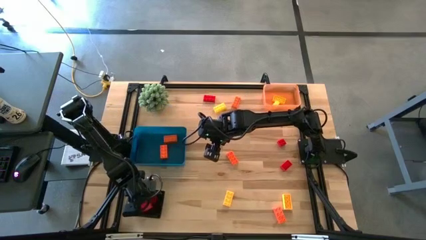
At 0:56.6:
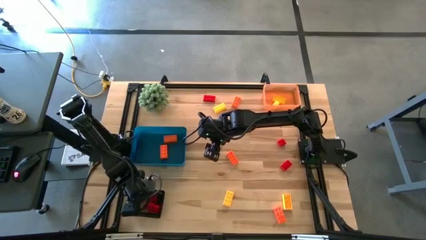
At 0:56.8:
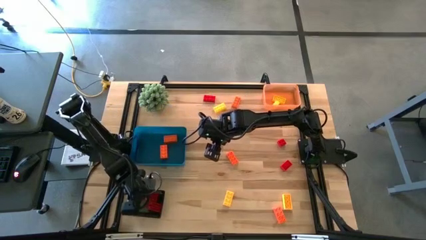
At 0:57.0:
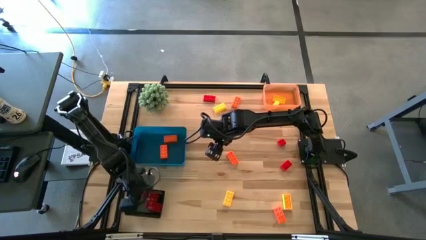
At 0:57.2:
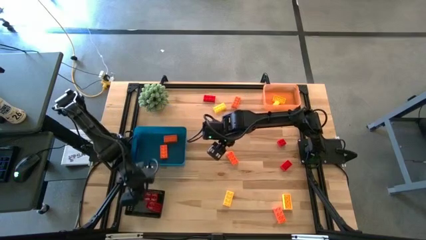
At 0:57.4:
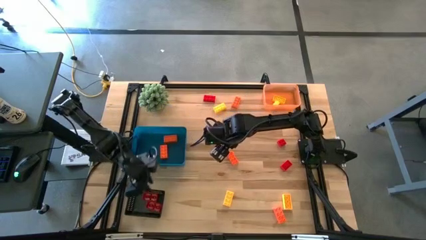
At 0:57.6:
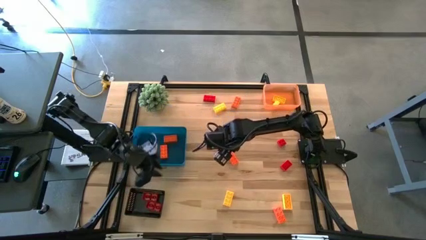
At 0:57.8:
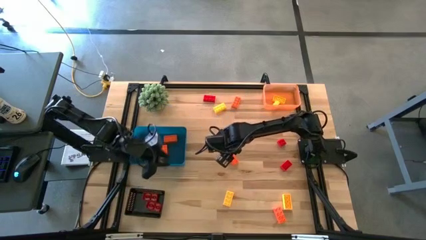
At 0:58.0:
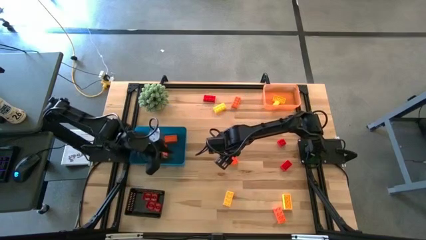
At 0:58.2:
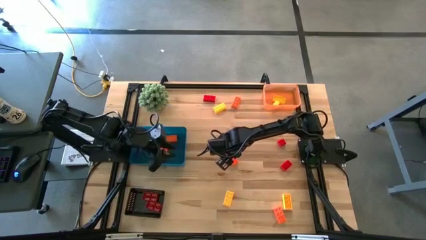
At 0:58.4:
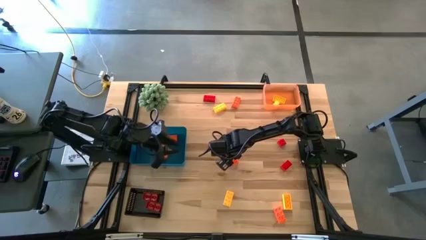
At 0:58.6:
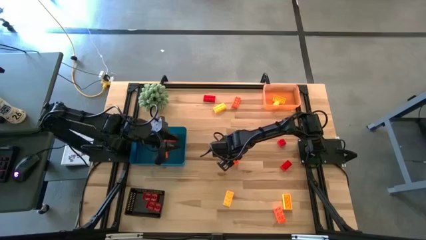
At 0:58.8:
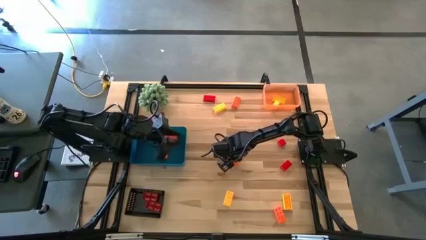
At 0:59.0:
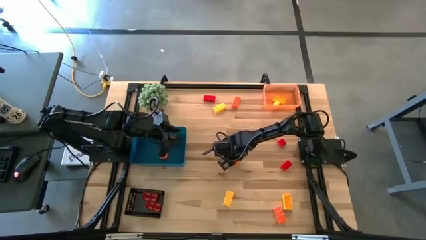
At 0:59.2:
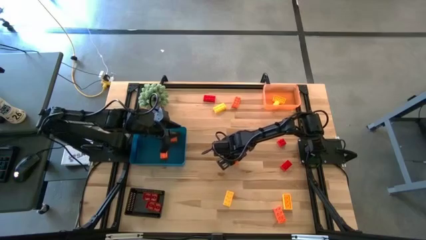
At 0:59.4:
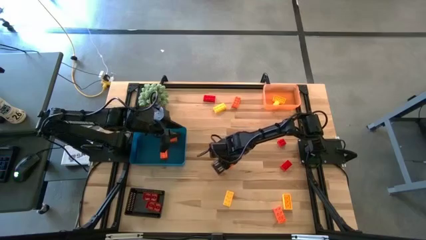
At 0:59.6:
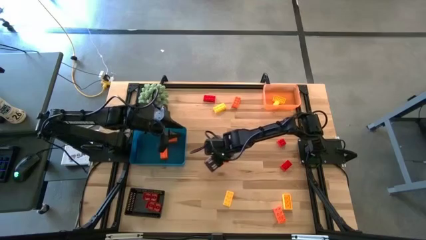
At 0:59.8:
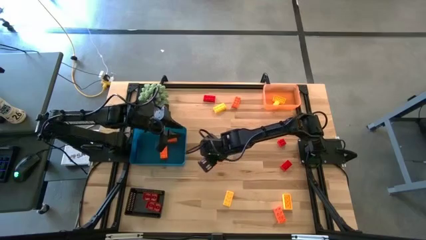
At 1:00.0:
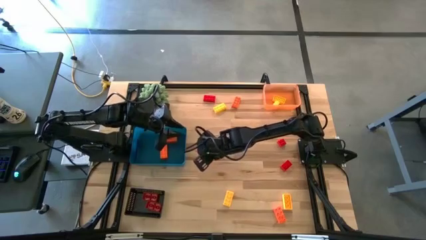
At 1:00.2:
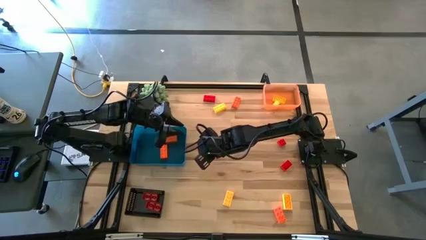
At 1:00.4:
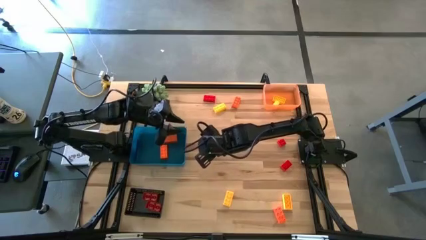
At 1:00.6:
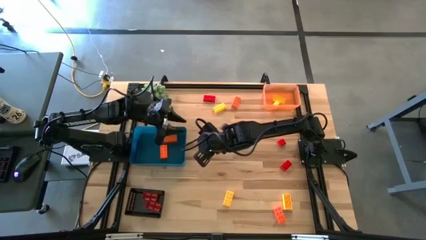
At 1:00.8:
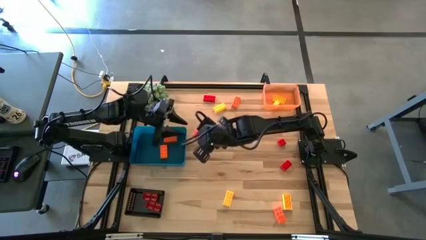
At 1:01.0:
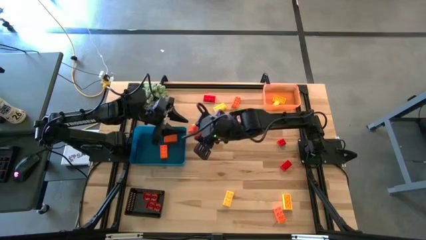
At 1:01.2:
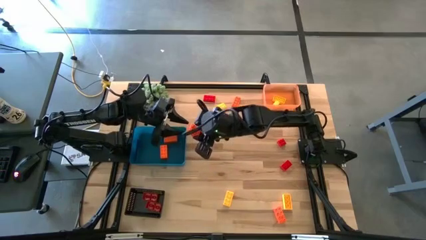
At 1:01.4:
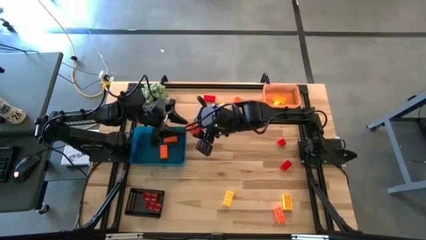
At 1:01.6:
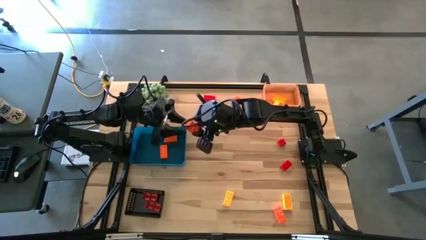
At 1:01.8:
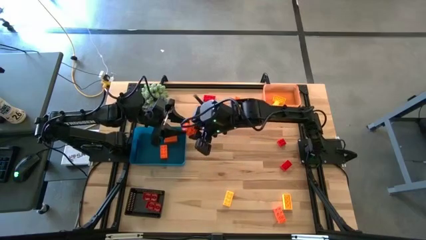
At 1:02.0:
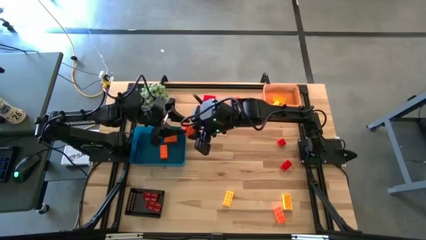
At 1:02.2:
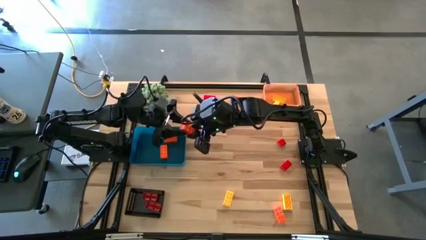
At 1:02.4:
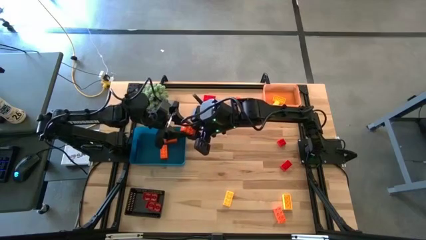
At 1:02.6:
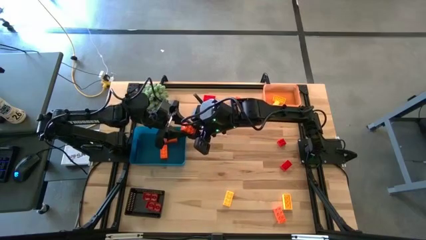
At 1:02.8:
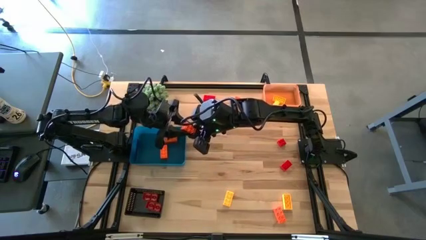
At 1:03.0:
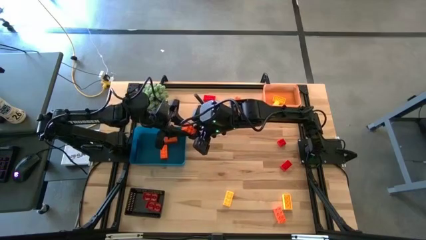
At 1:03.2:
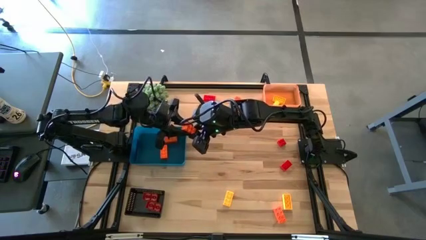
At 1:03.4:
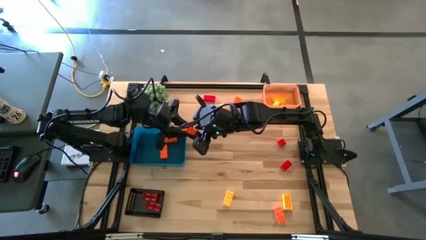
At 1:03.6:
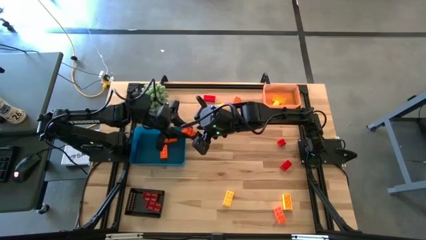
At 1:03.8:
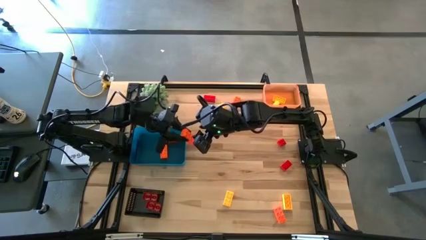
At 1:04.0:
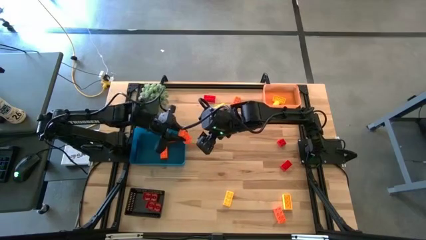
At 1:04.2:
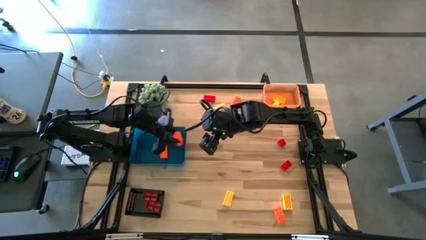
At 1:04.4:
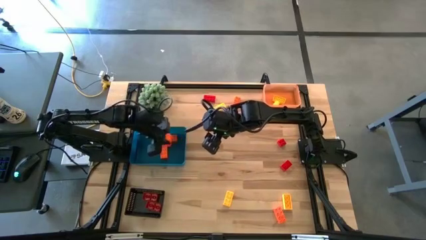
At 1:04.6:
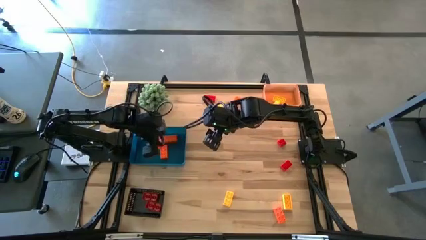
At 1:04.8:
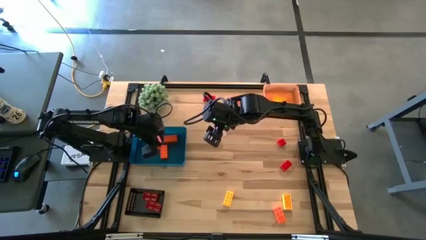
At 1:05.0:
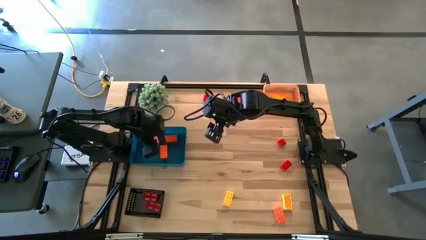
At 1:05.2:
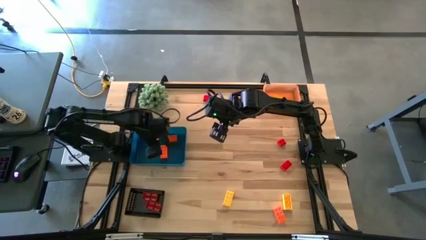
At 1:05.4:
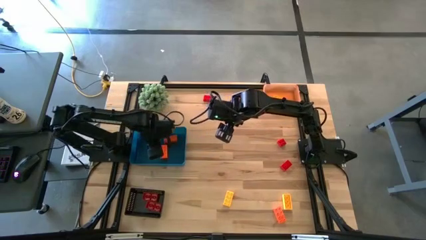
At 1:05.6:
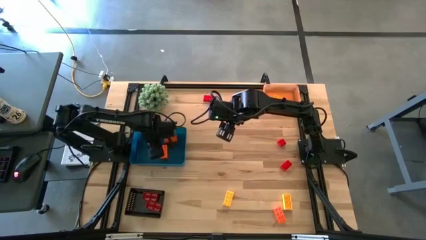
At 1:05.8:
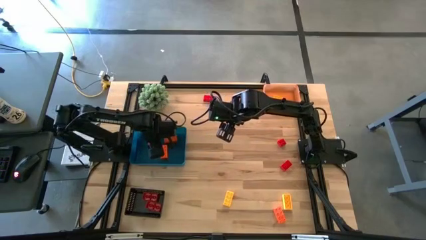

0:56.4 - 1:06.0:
Task: Sort & place blocks by color
Put the orange game piece into the blue bin

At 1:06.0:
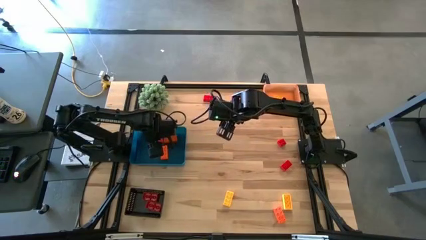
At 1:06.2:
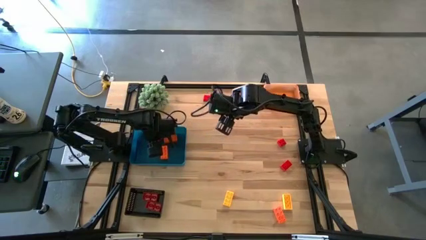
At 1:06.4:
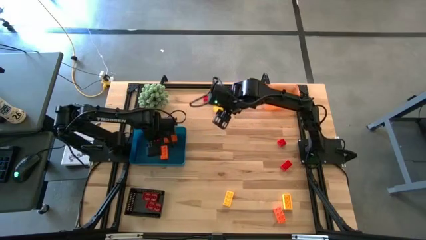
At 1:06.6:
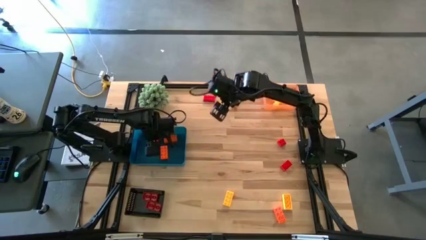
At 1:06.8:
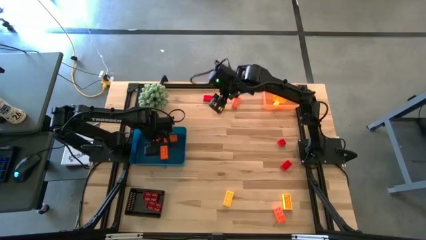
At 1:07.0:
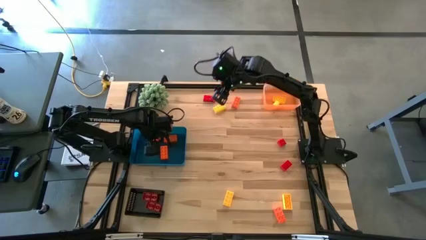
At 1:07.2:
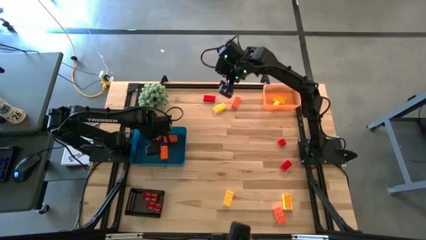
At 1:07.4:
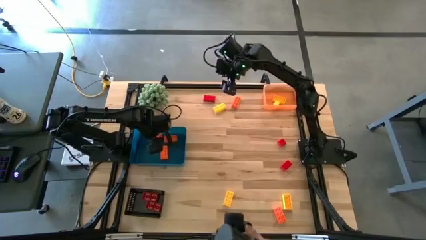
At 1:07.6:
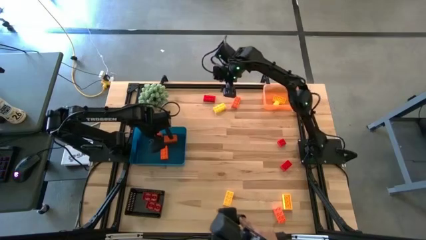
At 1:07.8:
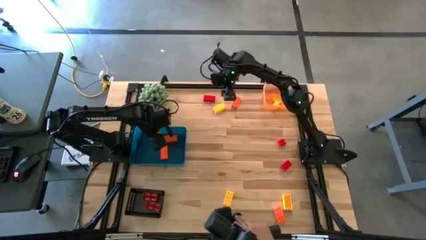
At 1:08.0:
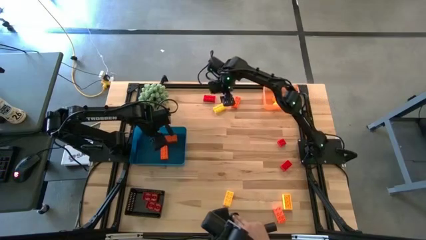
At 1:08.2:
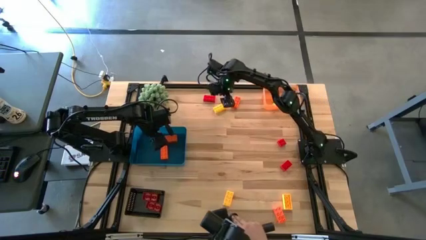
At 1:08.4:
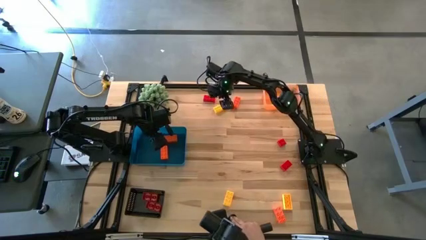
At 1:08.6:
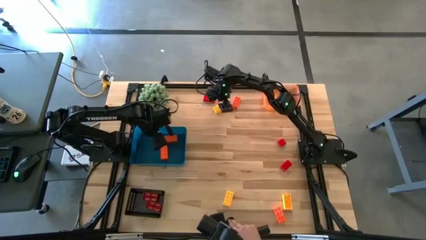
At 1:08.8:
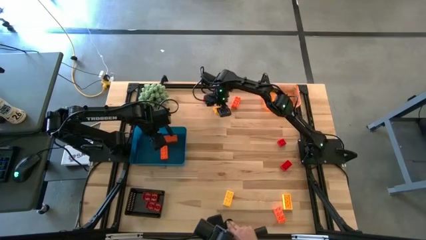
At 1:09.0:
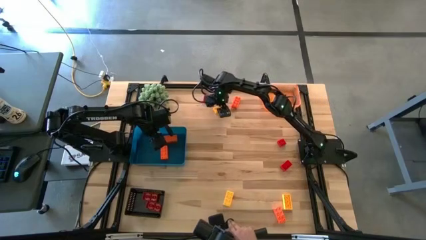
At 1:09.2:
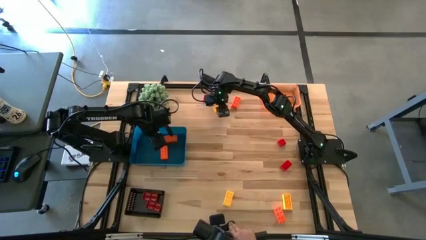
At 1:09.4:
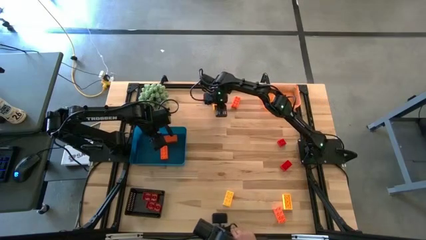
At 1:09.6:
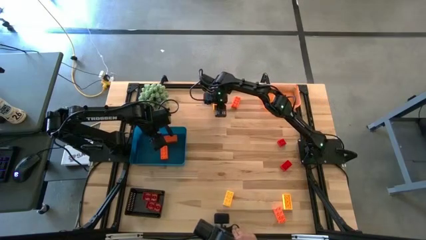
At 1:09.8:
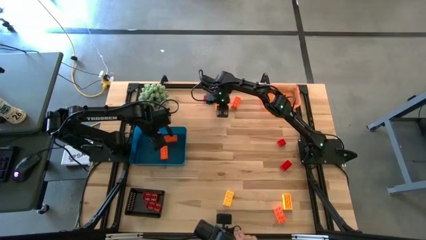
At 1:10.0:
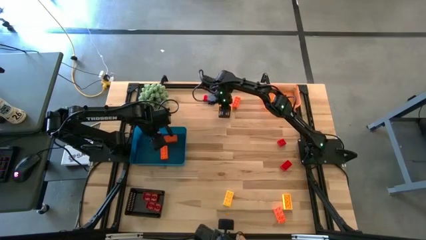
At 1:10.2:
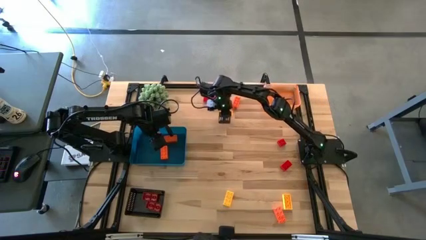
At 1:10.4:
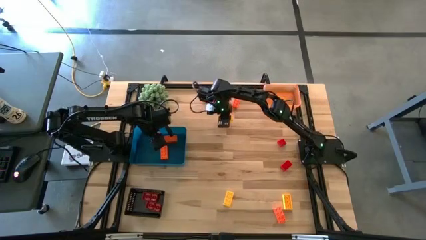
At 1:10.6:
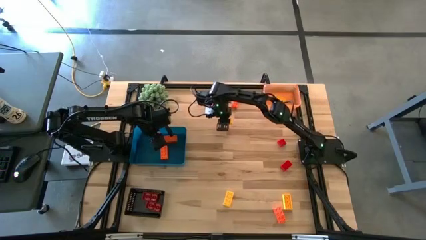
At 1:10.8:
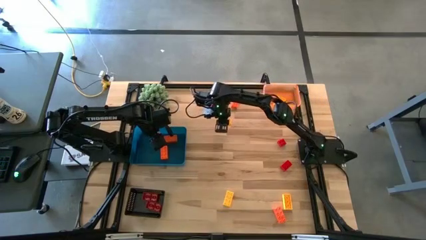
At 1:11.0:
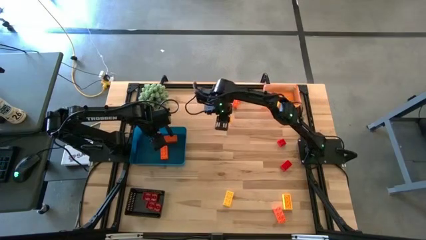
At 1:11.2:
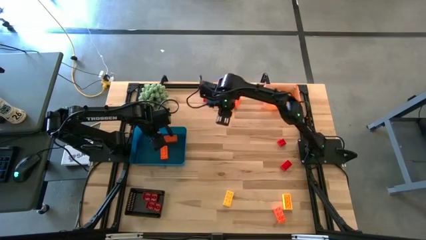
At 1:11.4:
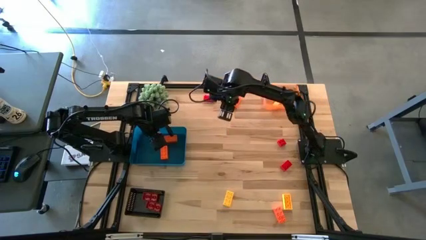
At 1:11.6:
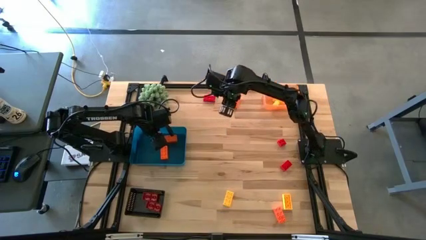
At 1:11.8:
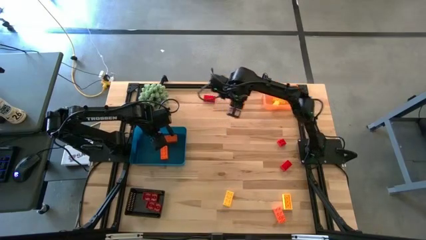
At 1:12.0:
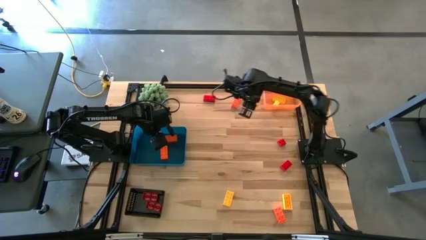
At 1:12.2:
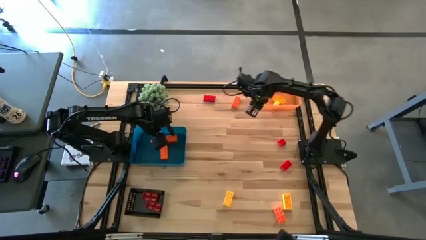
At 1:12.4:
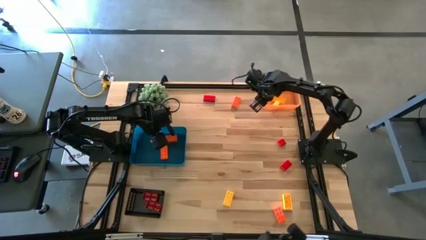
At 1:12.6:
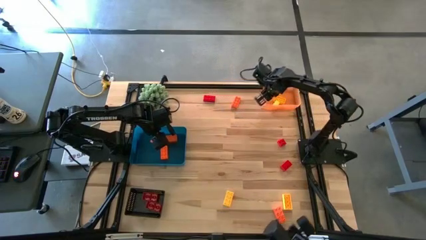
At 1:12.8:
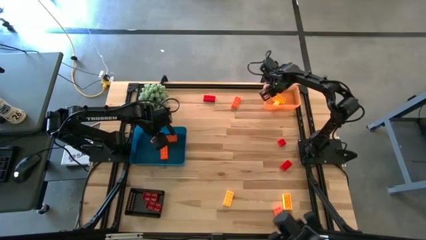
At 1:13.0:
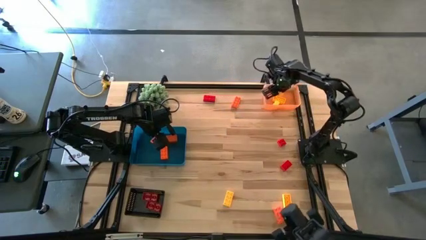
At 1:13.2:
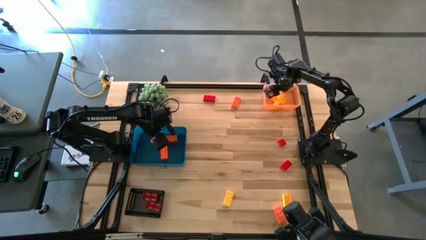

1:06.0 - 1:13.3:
Put the yellow game piece into the orange bin
